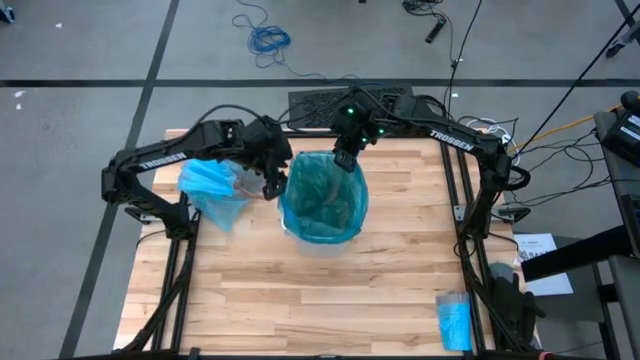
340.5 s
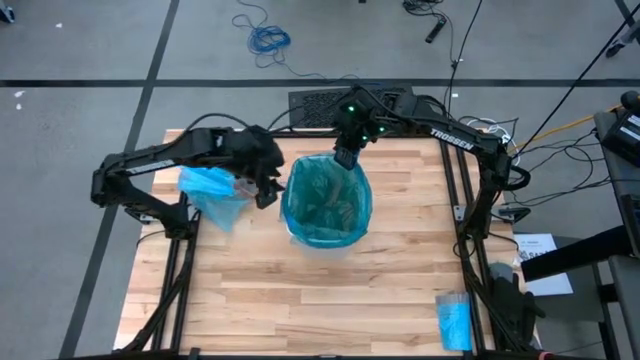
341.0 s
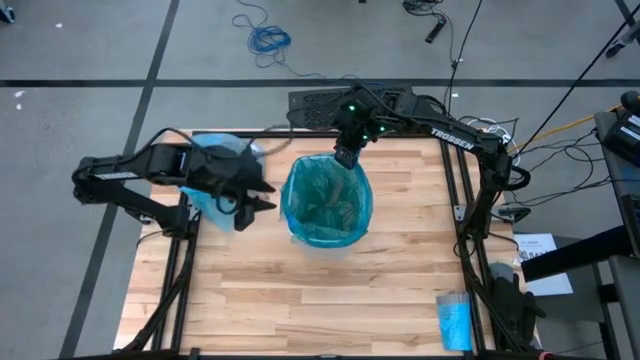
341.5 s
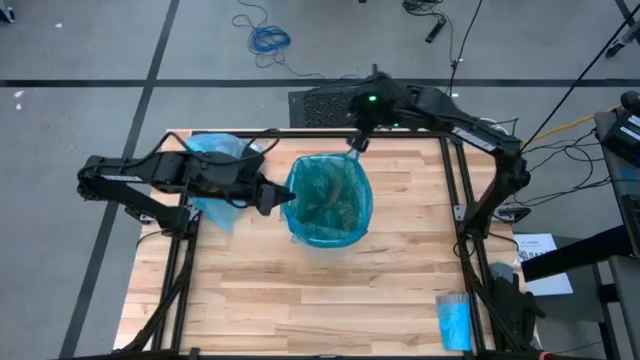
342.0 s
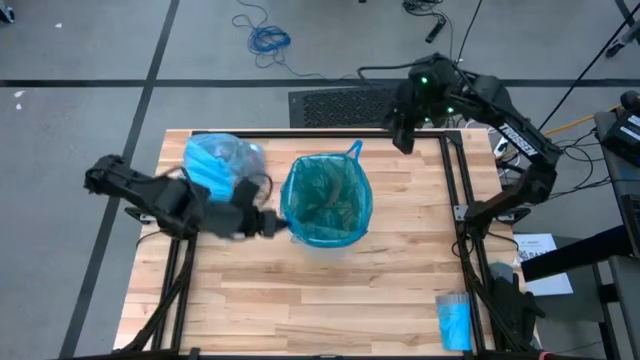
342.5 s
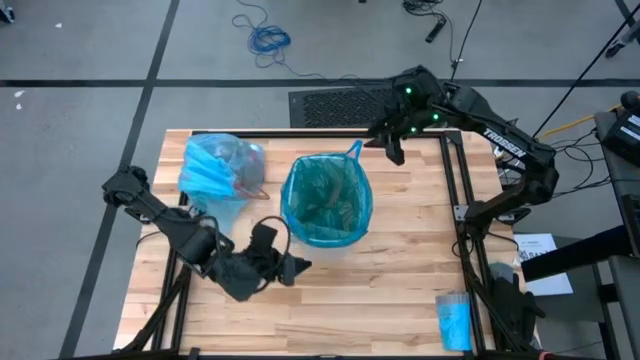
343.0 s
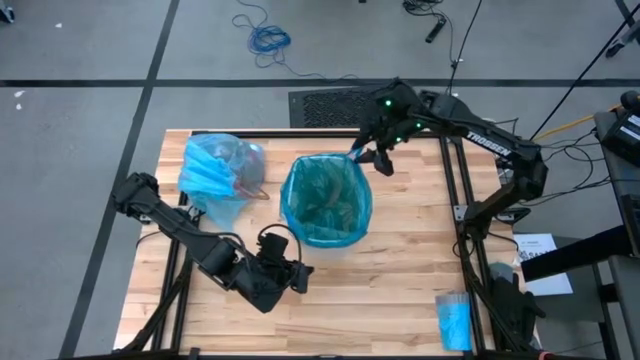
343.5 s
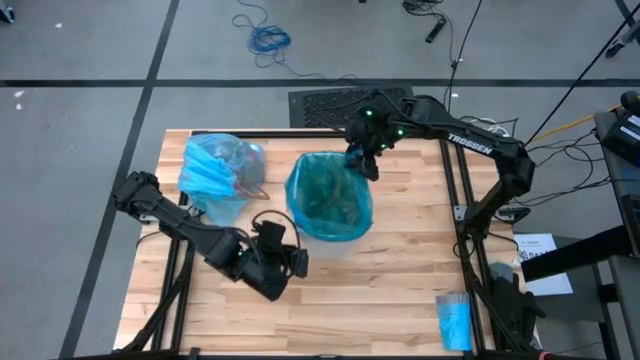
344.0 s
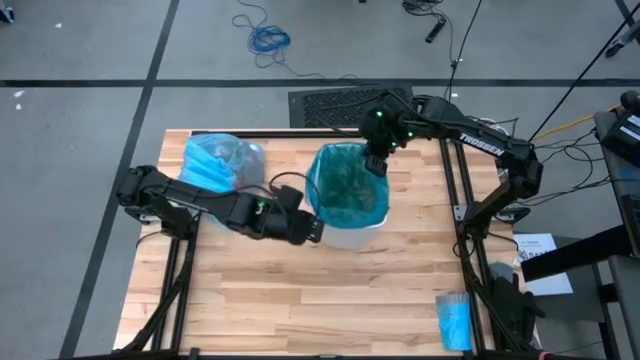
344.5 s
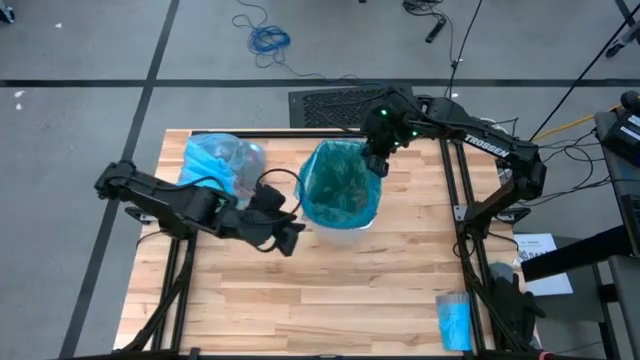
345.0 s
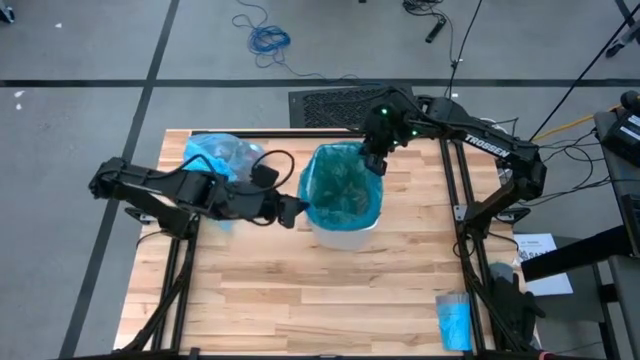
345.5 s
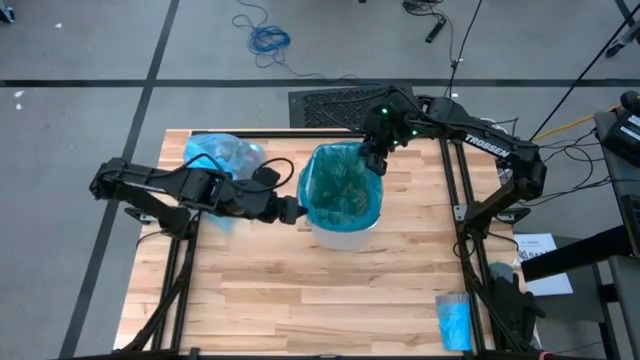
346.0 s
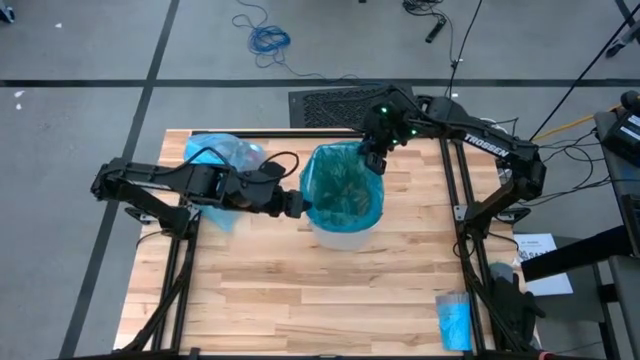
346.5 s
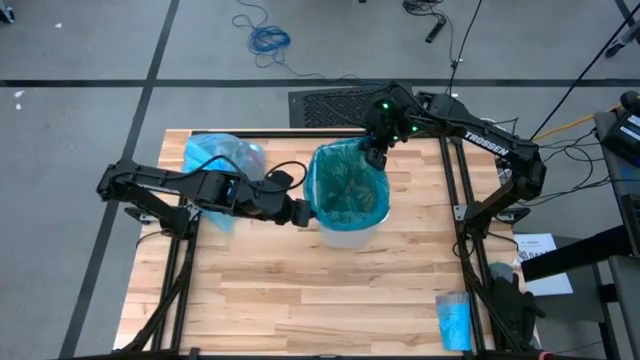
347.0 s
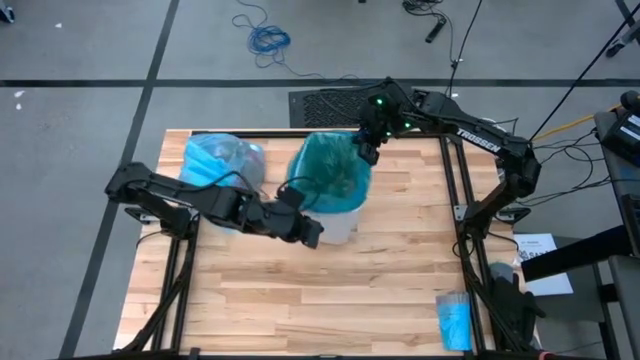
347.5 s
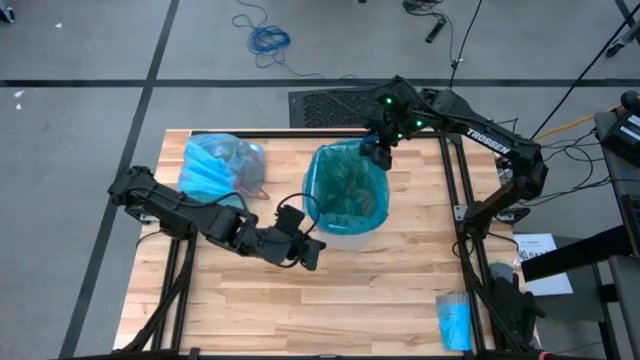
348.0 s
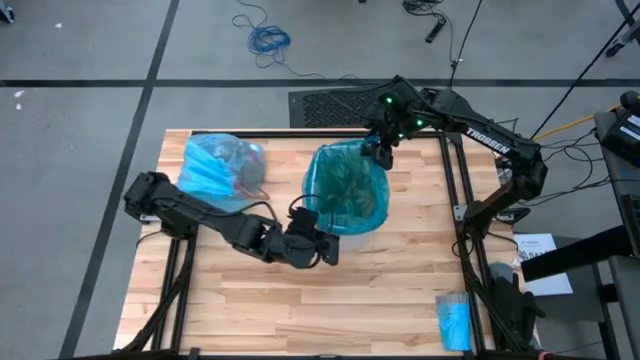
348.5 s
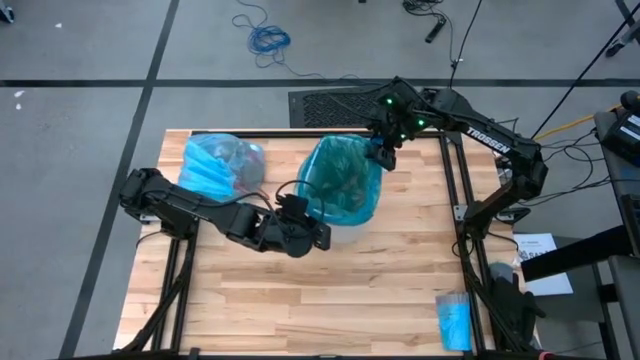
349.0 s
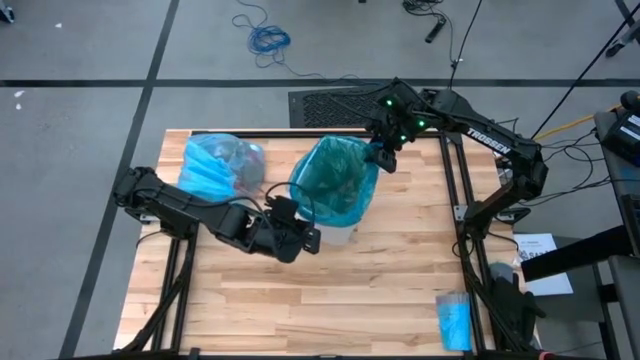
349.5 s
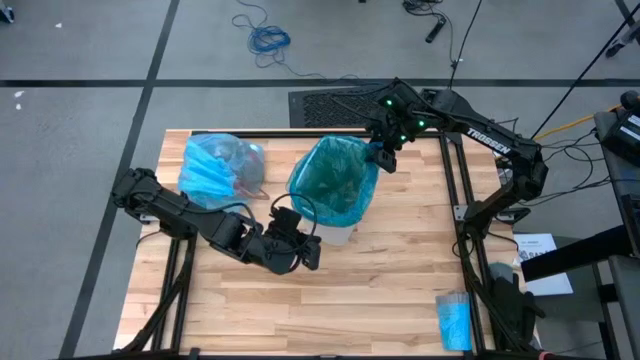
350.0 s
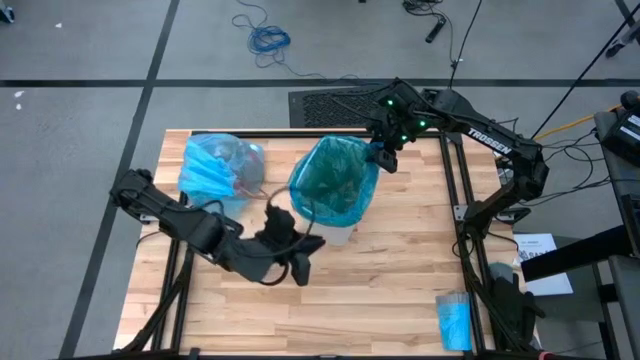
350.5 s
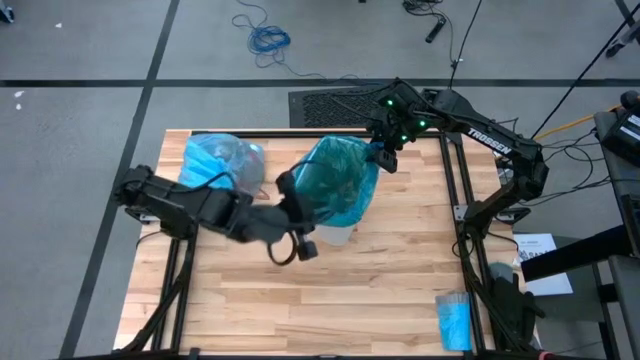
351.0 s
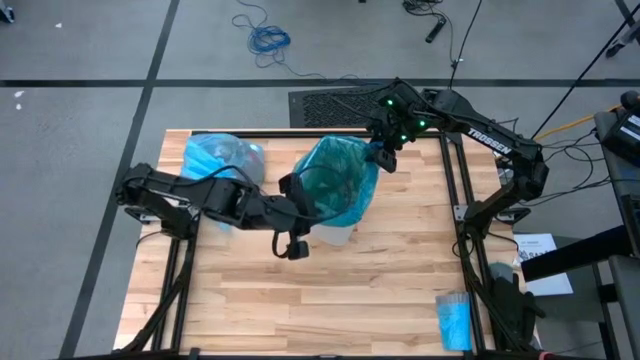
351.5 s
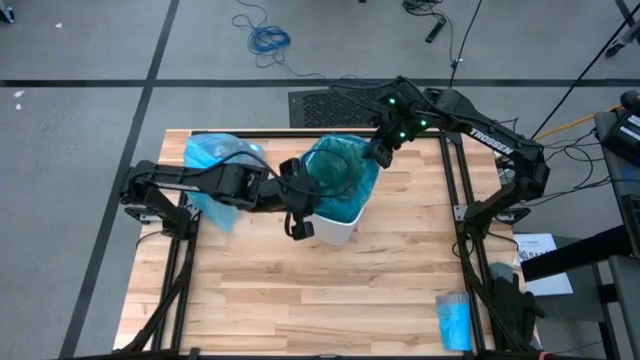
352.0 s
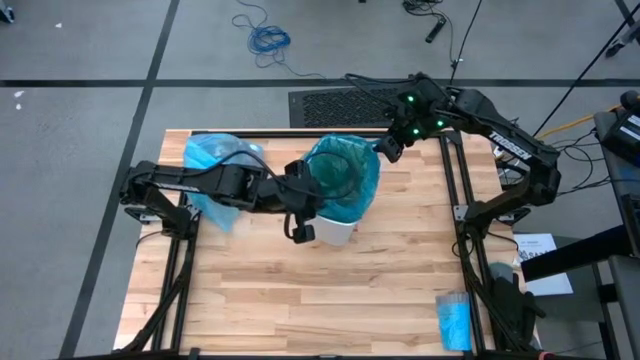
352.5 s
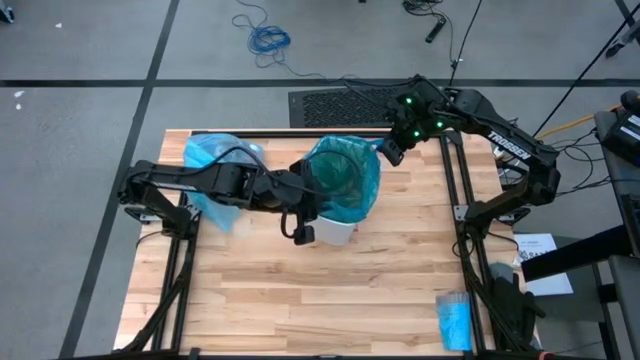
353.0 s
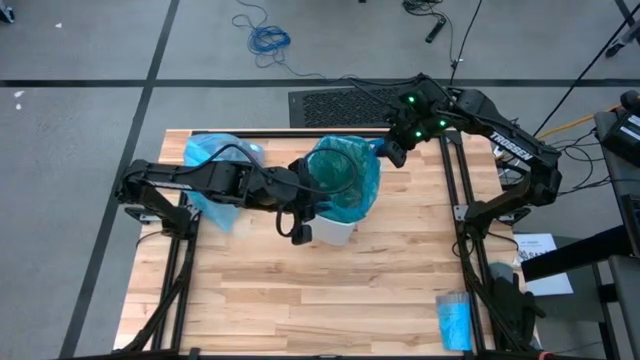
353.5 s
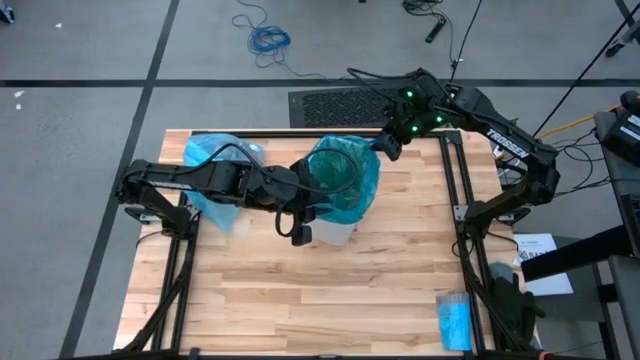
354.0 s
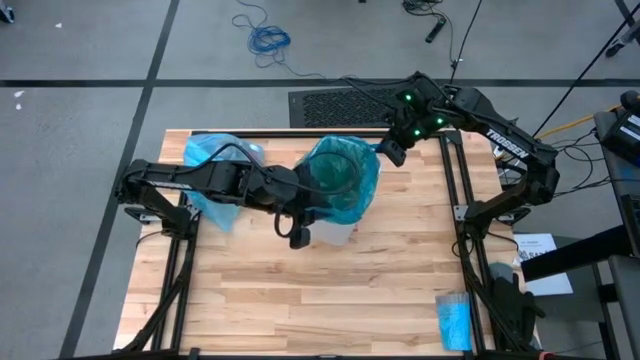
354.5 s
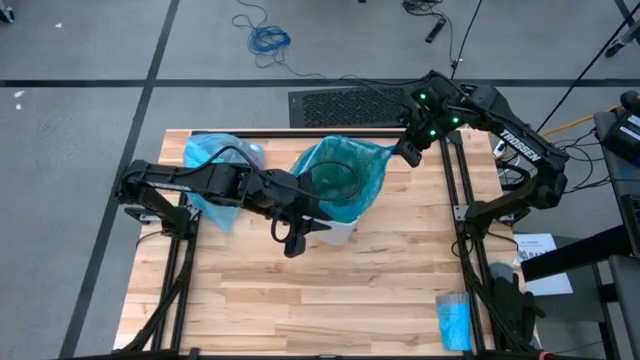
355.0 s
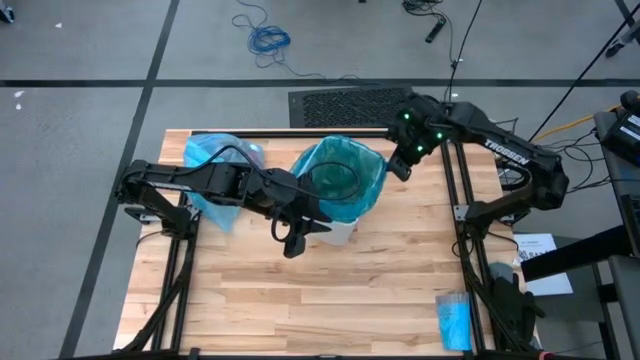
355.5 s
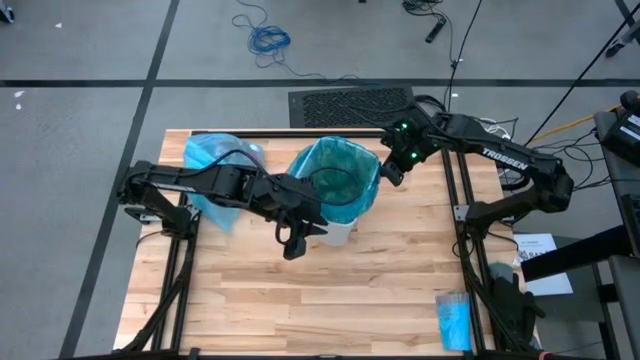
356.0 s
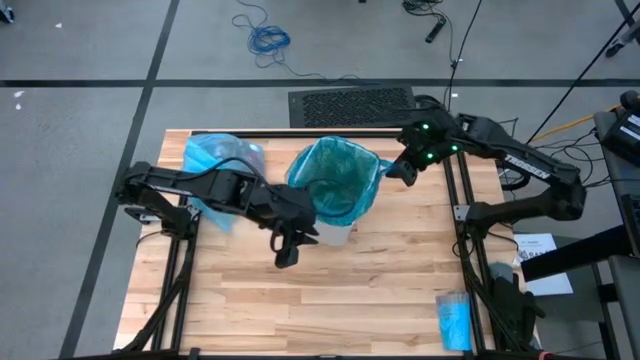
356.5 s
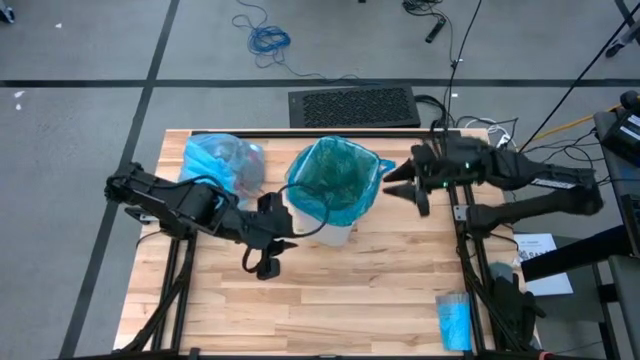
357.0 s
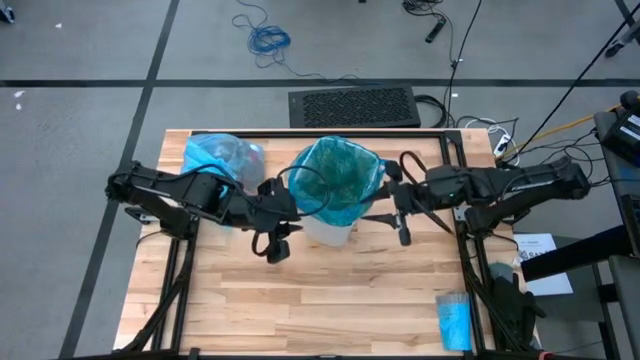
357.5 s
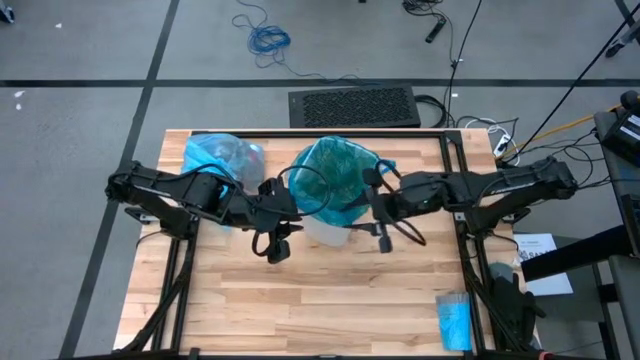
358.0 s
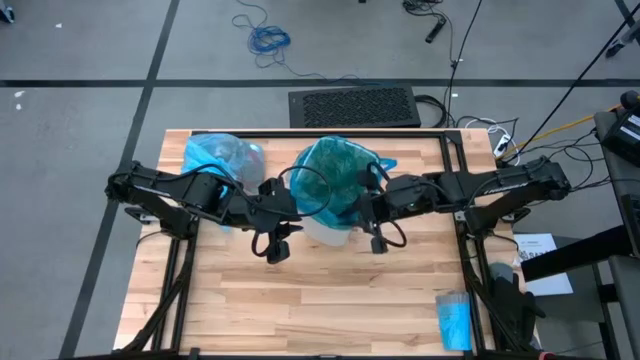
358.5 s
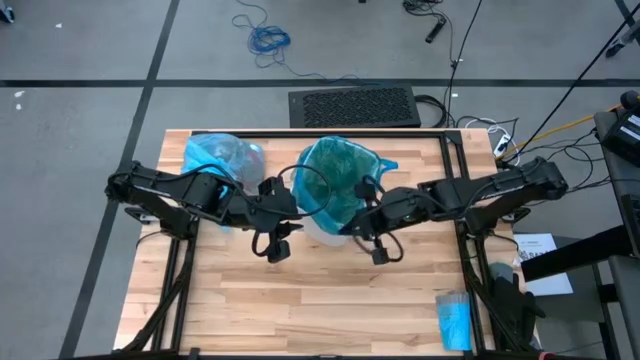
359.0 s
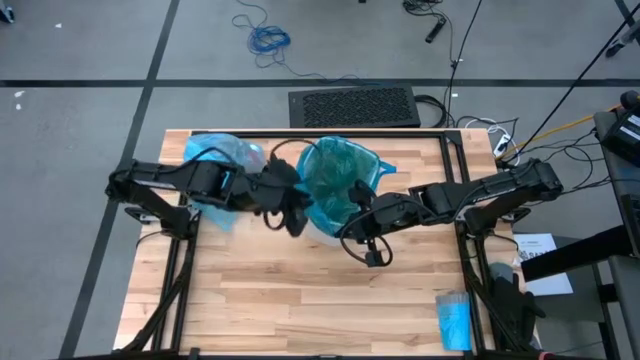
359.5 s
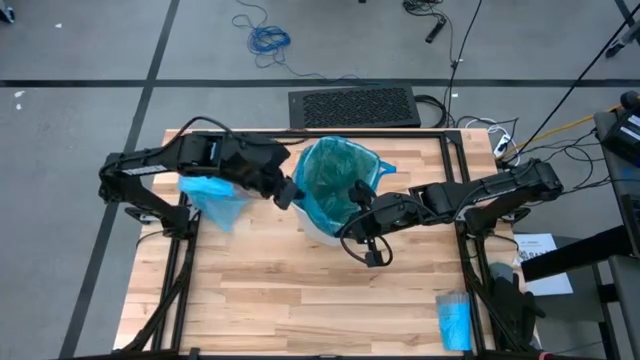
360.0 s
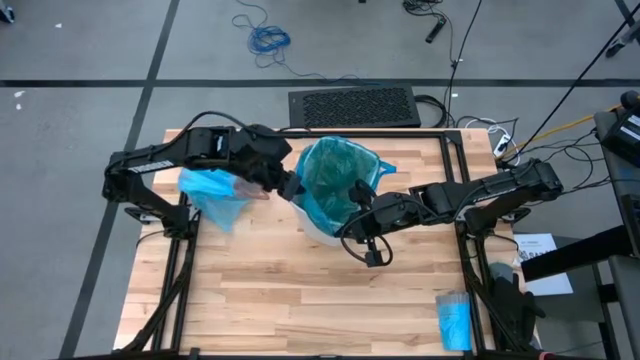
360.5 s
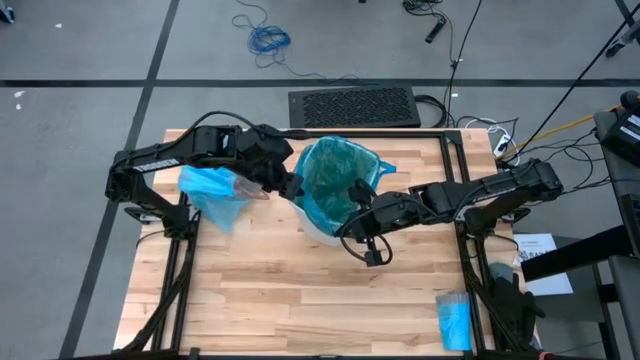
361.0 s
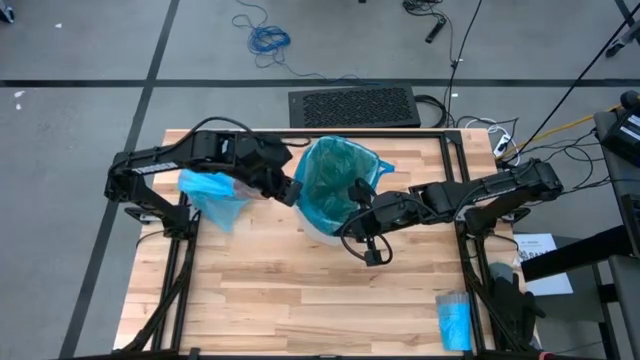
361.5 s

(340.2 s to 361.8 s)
Task: place trash/remove bag and relplace
Insert the new blue trash bag into the white trash bin
